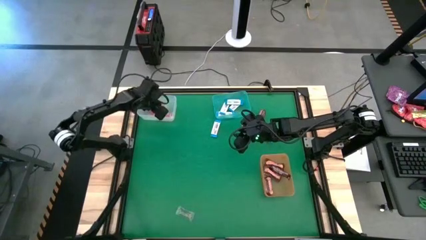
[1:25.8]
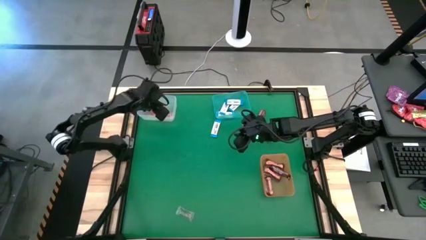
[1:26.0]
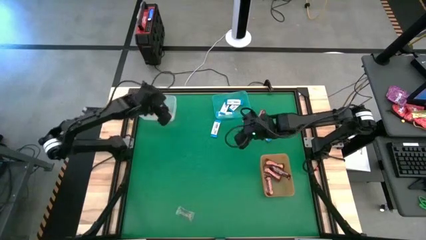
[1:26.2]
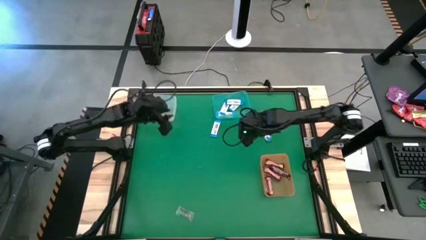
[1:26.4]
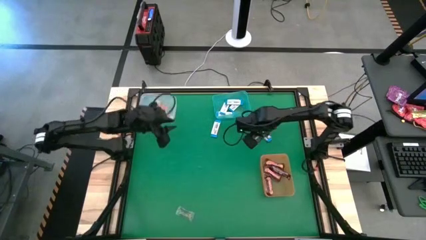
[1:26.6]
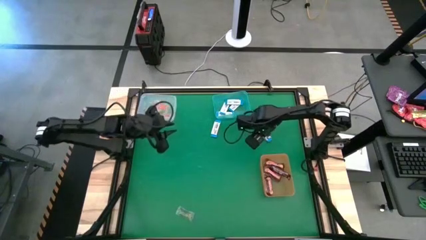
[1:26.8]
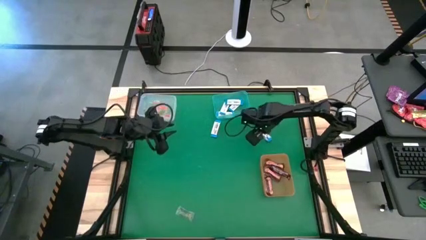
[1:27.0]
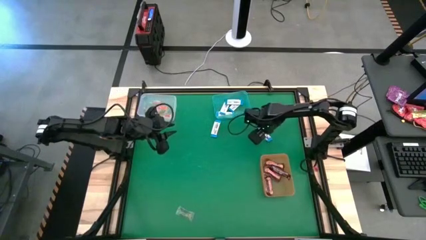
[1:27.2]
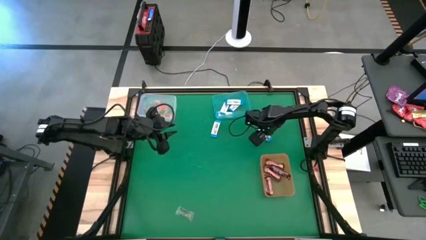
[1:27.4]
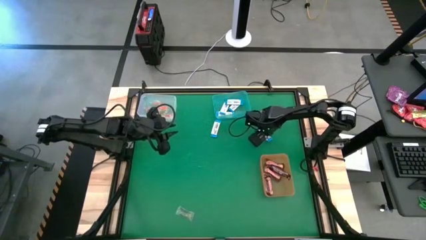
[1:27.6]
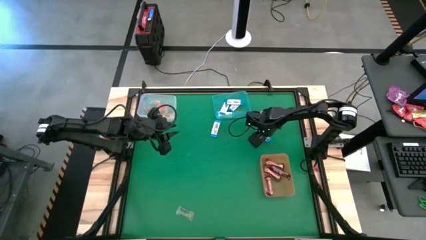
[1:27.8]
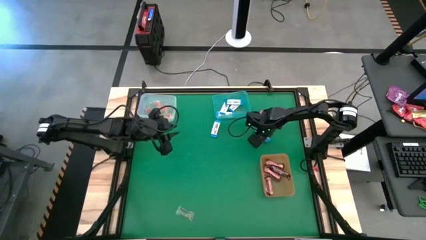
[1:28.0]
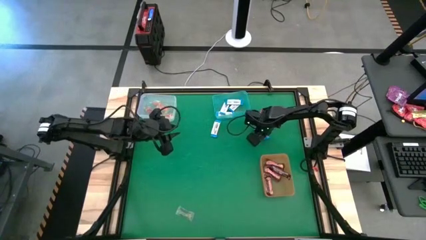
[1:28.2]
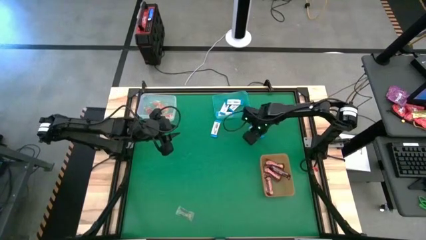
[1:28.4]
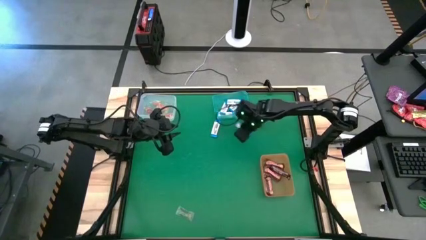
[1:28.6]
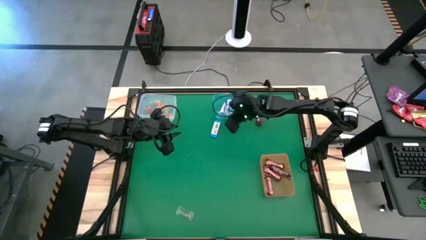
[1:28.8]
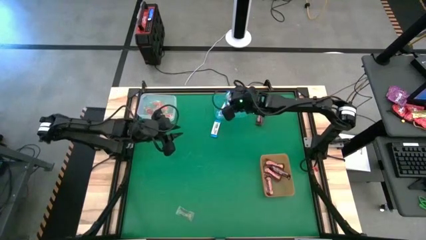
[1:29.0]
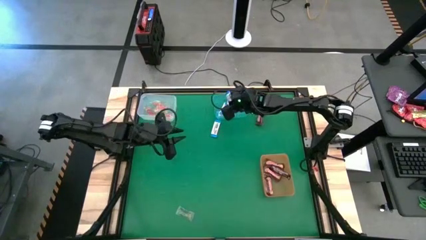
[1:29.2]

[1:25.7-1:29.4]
Task: Sort candy by brand, put in halloween buckets
Put the white chocolate into the light blue bin

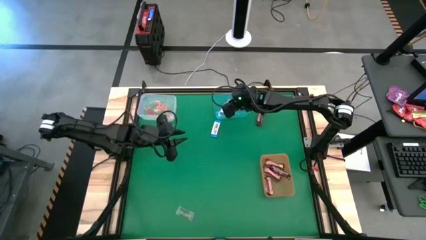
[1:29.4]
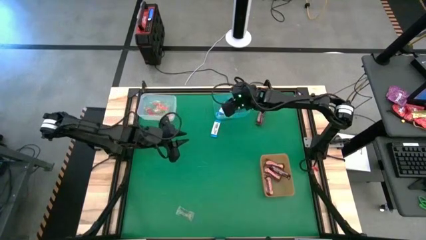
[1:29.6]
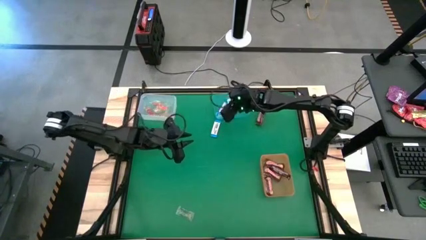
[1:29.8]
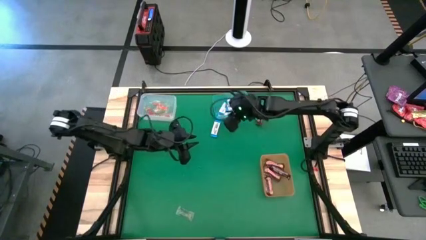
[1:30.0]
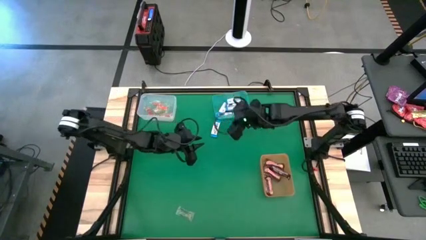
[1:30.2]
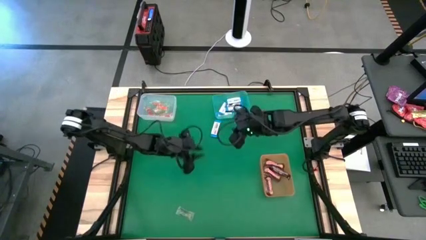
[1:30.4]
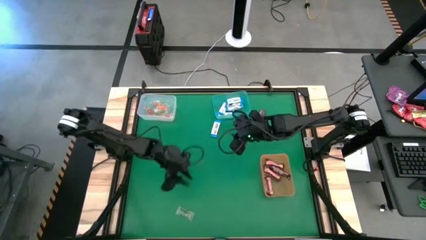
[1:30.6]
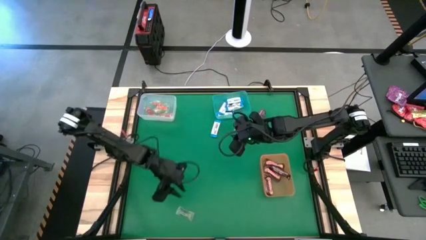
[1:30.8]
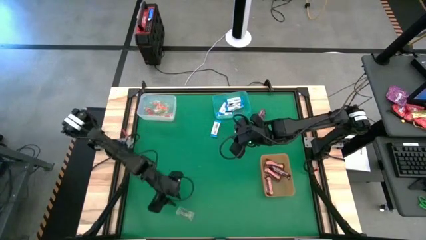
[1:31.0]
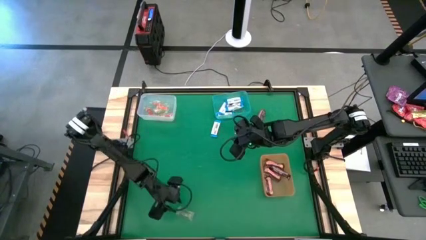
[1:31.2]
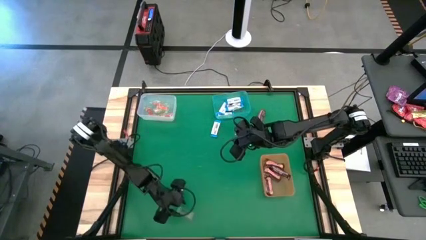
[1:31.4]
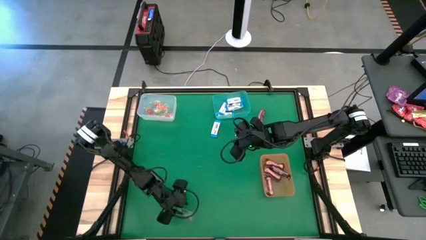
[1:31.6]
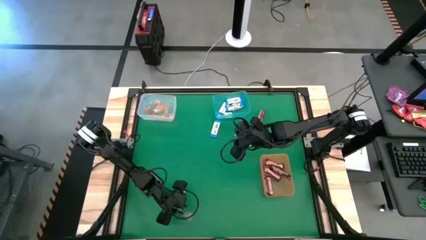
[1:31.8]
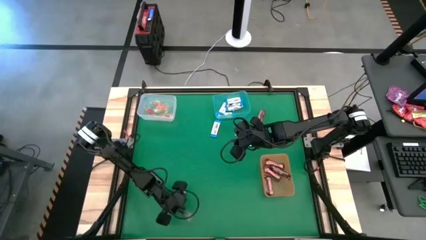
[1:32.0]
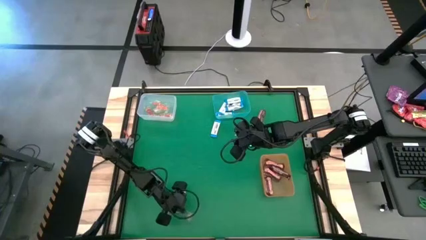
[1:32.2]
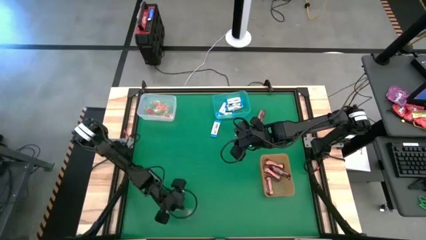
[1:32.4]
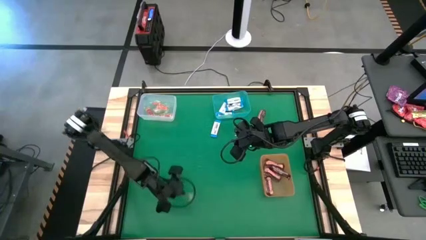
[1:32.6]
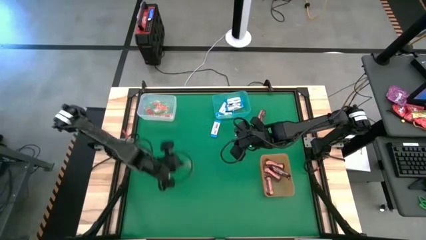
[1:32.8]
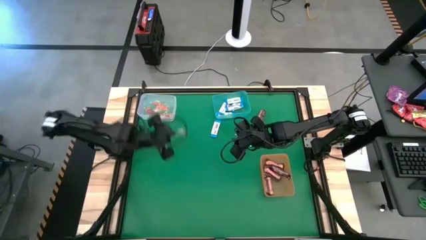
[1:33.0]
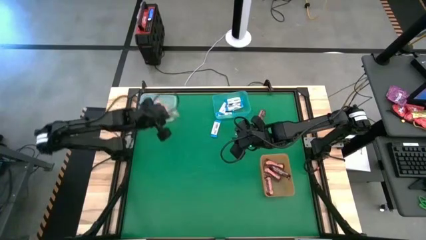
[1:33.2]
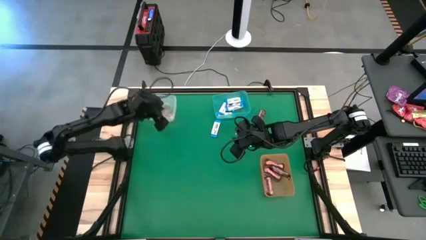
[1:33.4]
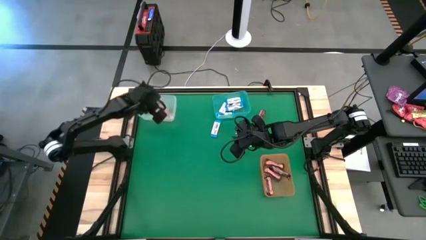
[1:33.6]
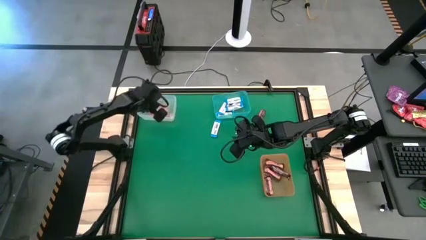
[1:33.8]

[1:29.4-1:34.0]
Put the green gummy into the white bin

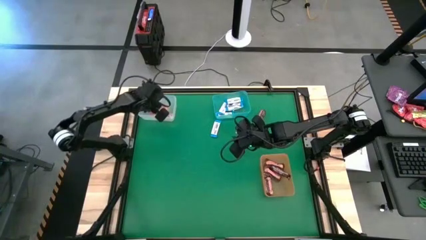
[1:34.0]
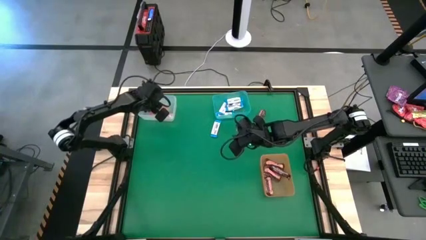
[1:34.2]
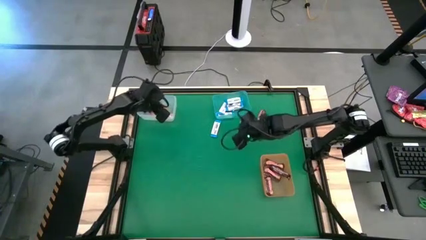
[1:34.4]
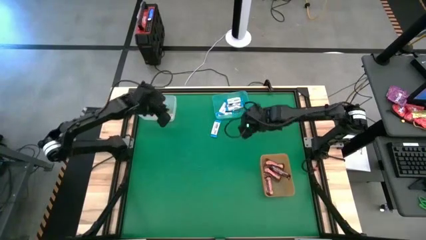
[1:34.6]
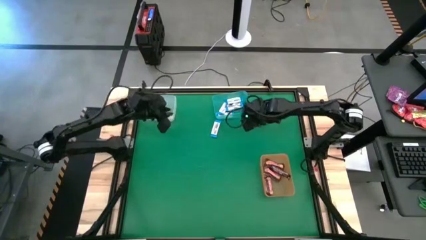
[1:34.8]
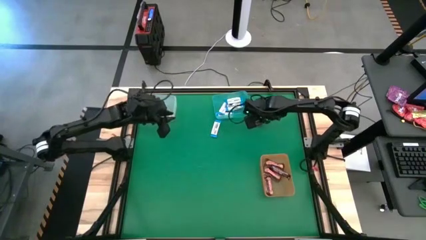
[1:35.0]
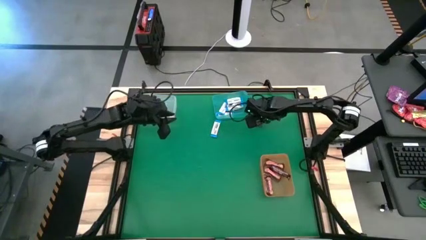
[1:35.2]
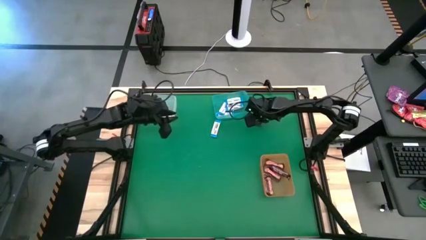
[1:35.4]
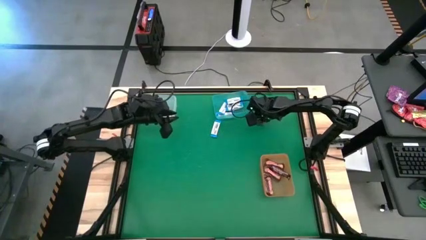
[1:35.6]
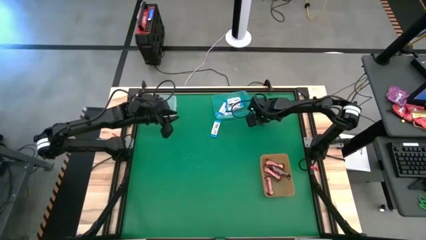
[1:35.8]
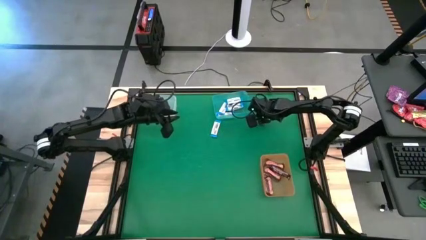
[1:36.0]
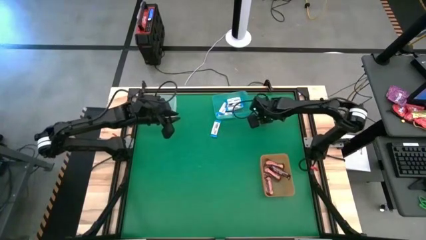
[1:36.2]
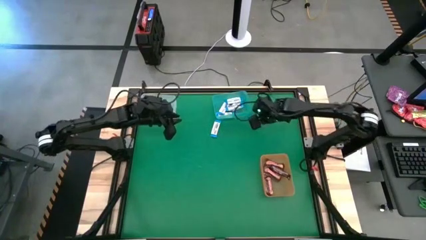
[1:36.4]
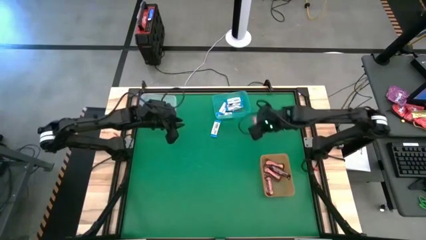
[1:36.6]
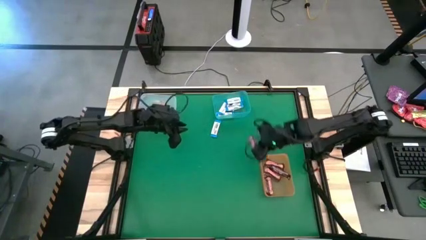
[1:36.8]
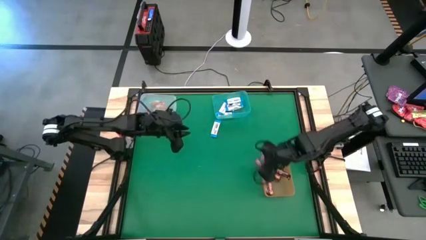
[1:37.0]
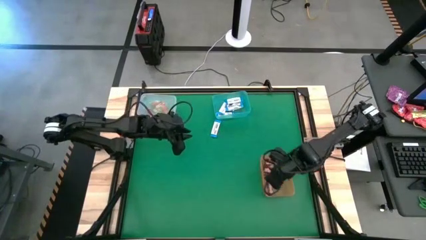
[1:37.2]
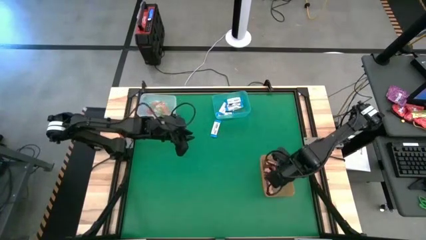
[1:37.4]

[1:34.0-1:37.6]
Put the brown chocolate into the orange bin

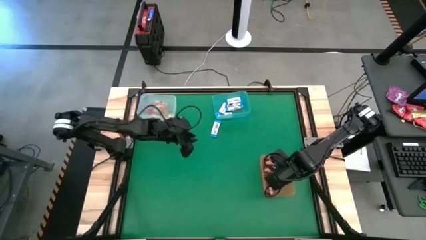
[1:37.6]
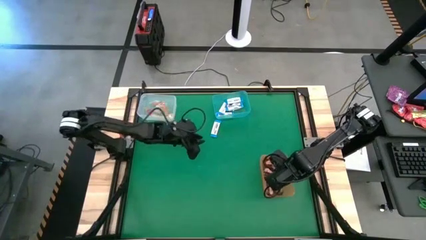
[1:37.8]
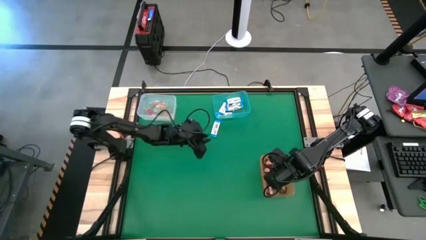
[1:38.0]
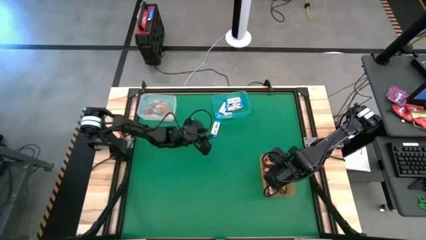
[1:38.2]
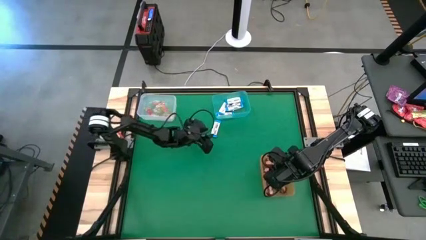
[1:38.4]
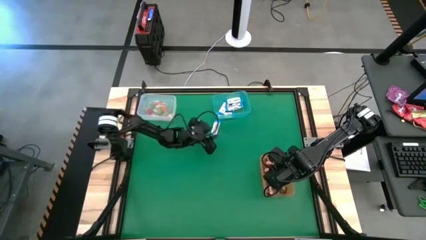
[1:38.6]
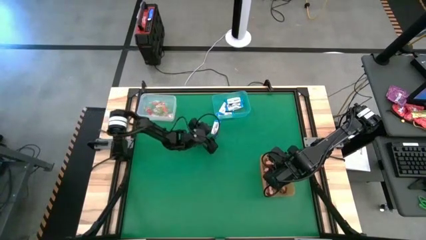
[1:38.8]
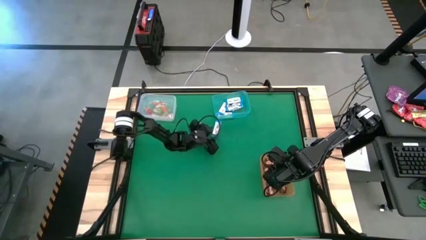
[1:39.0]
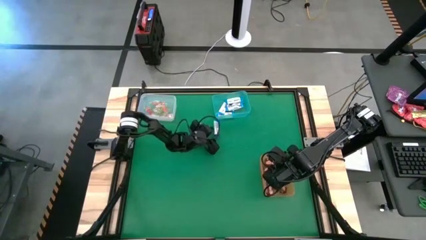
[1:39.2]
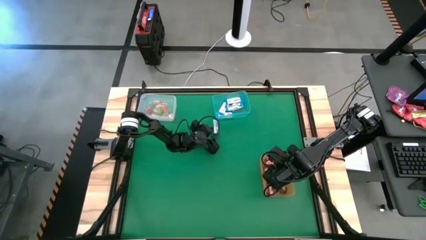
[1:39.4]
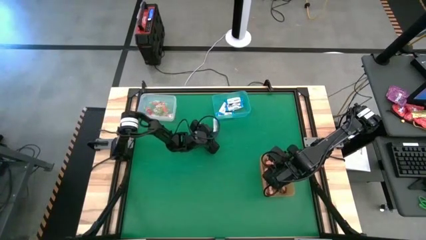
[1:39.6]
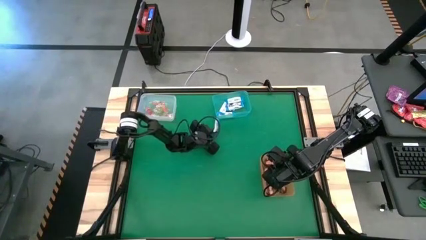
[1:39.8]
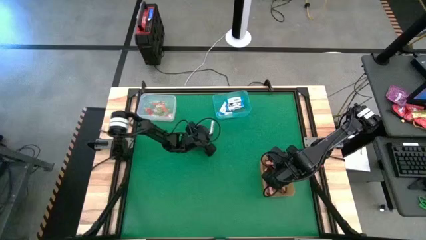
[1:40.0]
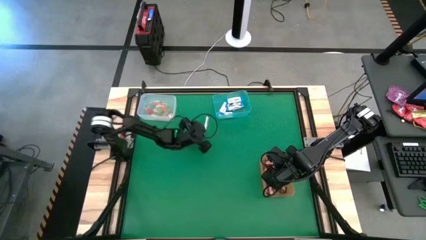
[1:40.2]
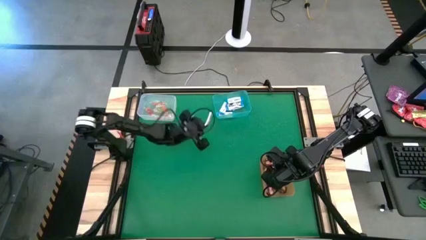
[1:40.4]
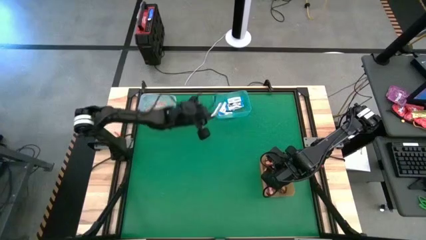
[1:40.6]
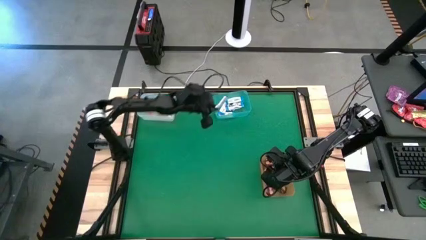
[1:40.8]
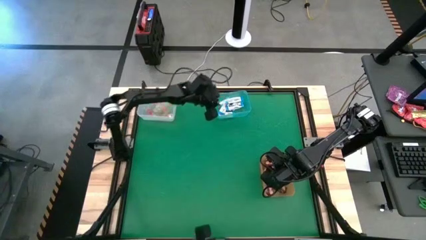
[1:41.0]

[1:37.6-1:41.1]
Put the white chocolate into the light blue bin

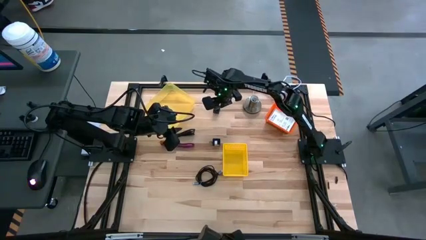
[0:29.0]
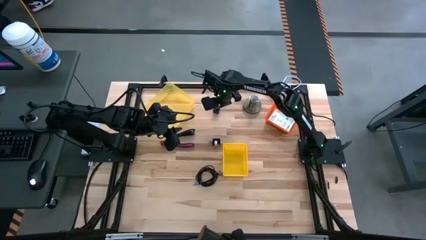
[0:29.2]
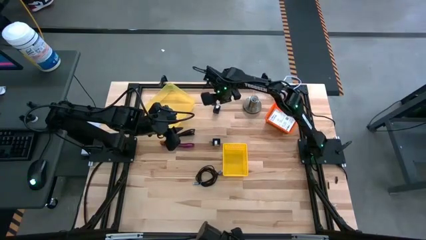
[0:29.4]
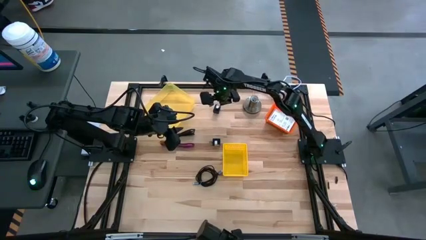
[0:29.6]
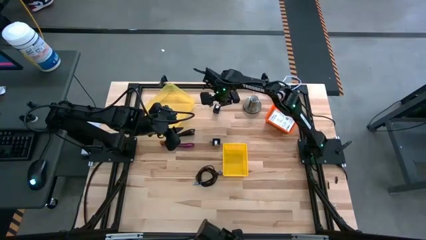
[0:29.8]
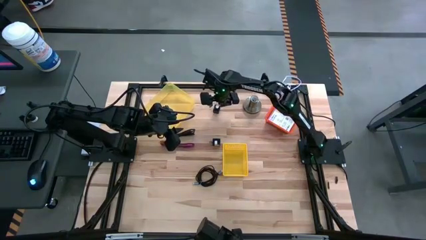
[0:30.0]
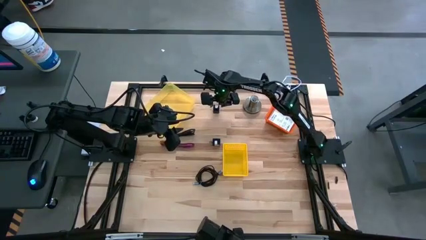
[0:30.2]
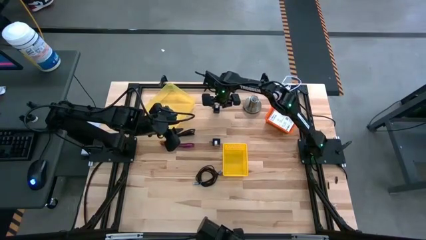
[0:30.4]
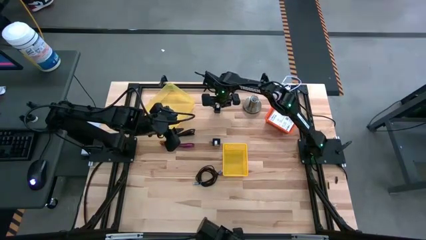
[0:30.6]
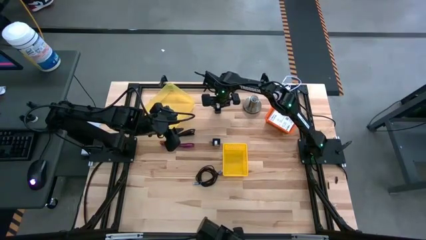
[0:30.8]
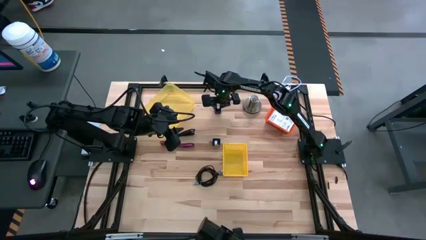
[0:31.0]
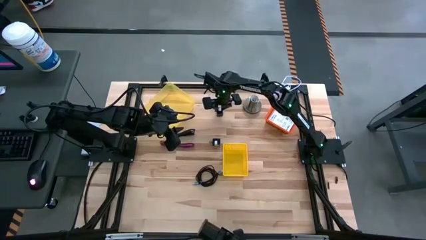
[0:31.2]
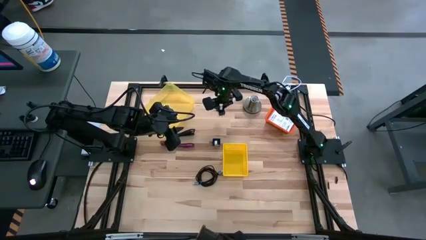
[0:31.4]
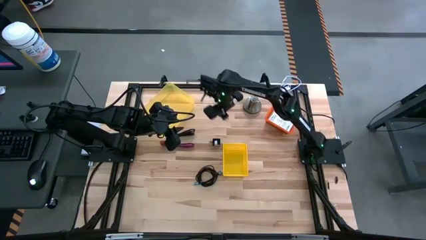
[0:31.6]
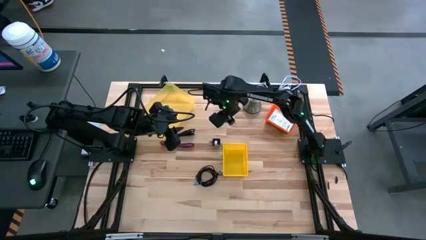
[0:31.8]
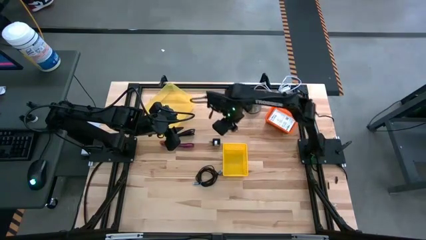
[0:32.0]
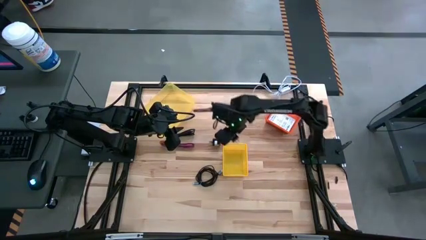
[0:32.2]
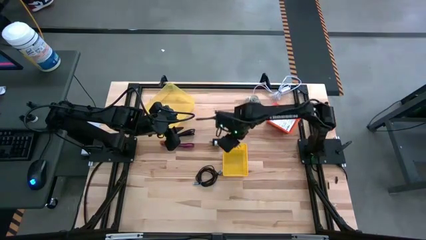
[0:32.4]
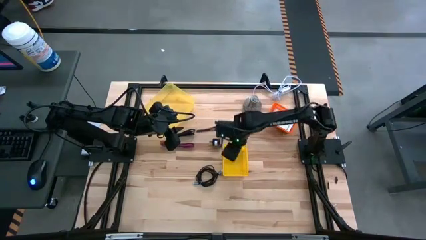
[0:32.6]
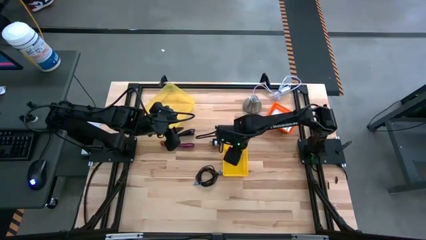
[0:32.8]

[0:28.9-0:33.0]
Task: Pick and place items into bin
Put the top black charger adapter into the yellow bin
